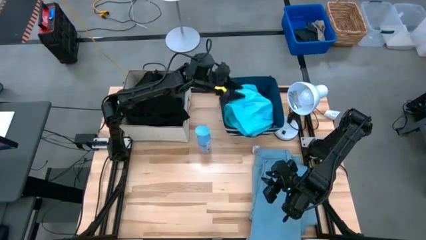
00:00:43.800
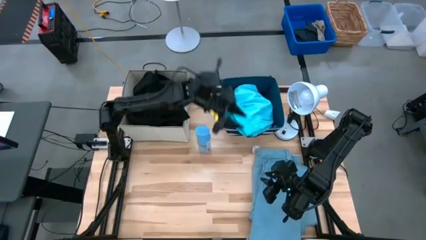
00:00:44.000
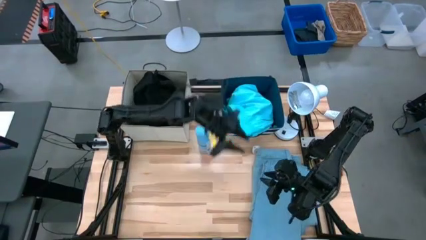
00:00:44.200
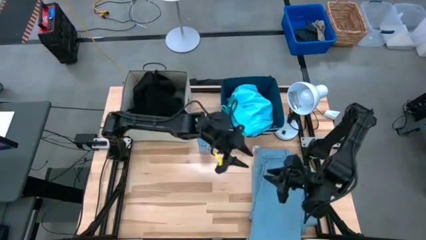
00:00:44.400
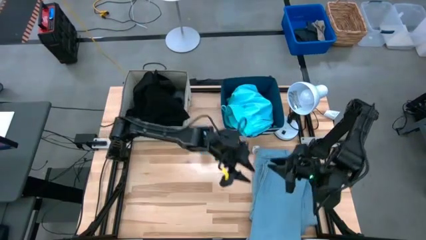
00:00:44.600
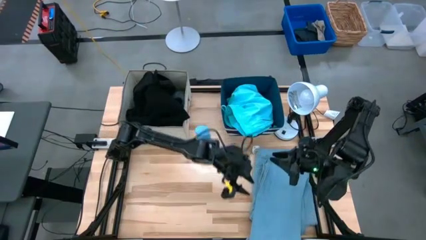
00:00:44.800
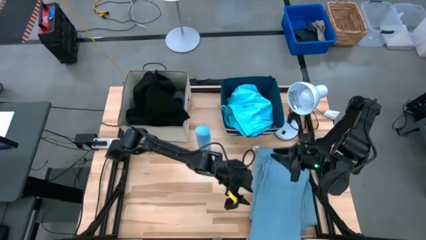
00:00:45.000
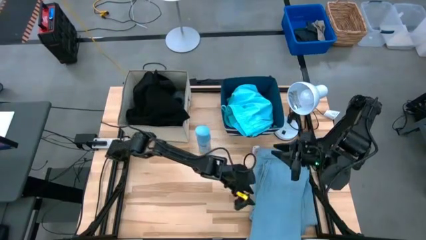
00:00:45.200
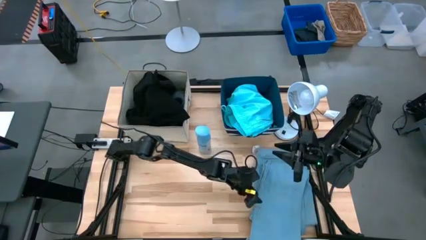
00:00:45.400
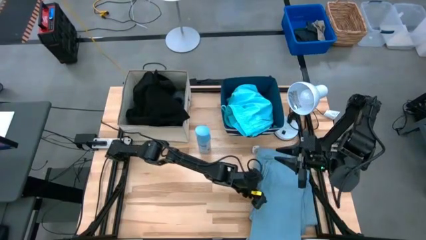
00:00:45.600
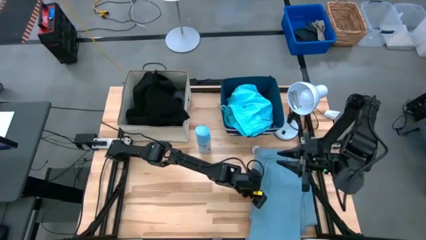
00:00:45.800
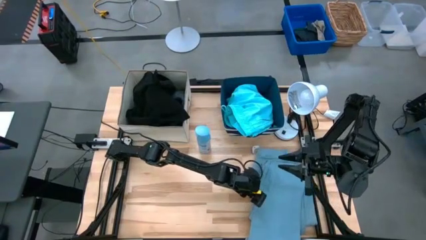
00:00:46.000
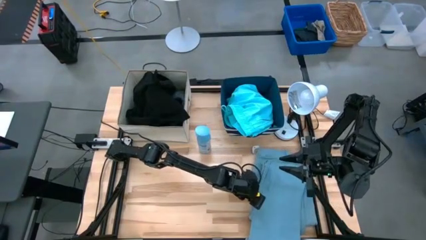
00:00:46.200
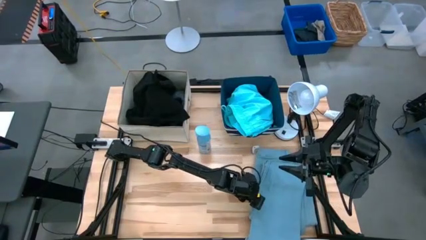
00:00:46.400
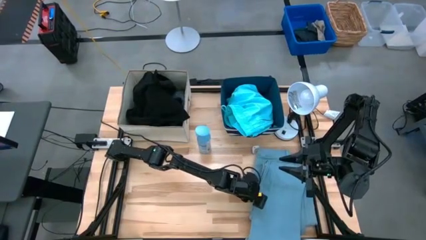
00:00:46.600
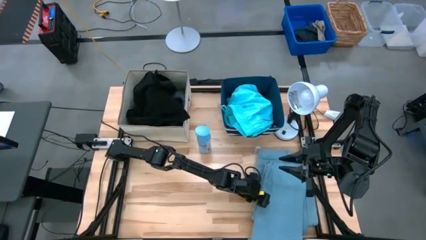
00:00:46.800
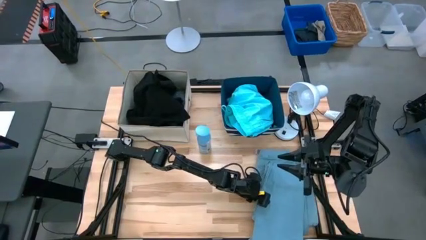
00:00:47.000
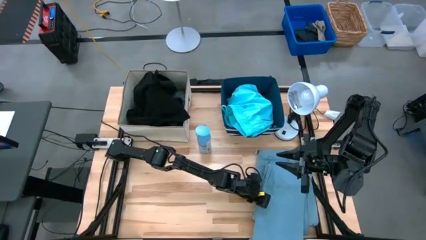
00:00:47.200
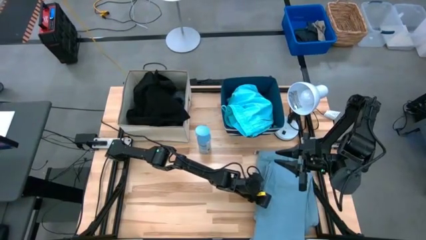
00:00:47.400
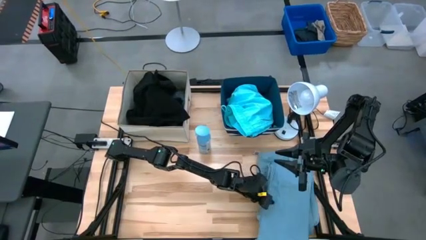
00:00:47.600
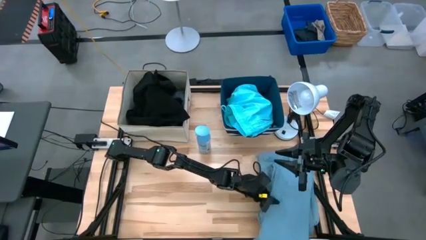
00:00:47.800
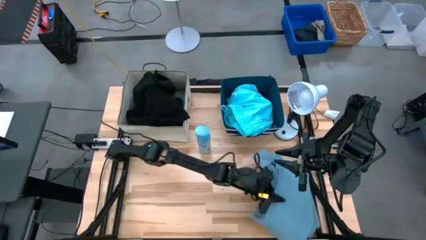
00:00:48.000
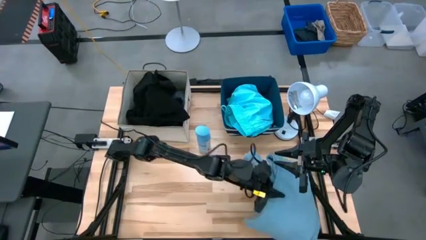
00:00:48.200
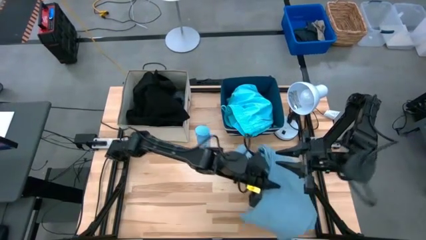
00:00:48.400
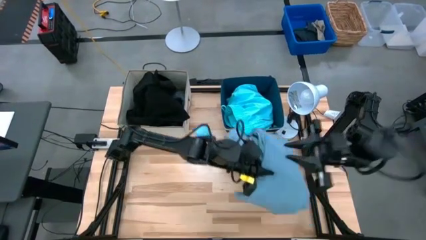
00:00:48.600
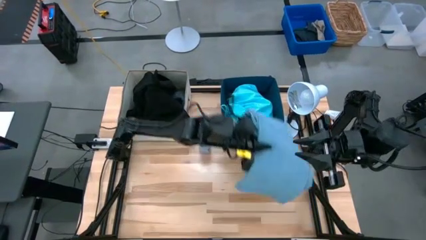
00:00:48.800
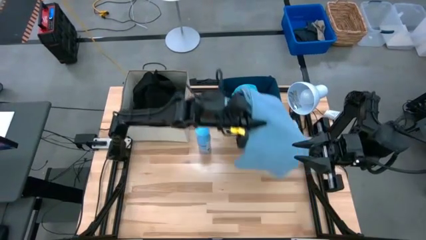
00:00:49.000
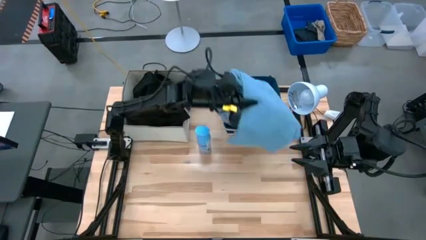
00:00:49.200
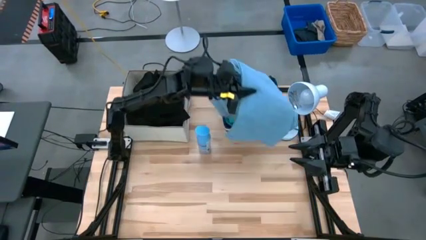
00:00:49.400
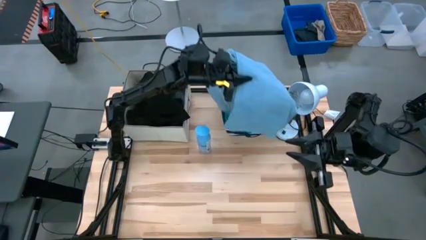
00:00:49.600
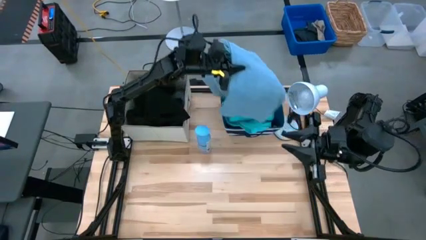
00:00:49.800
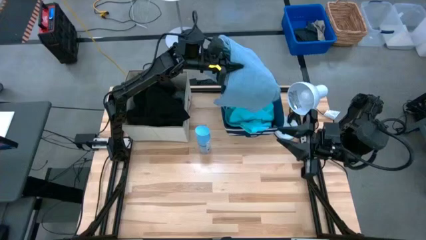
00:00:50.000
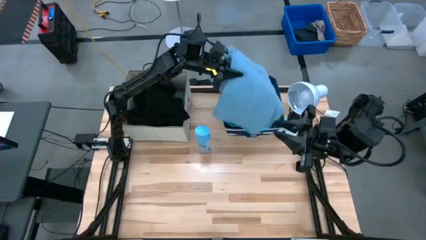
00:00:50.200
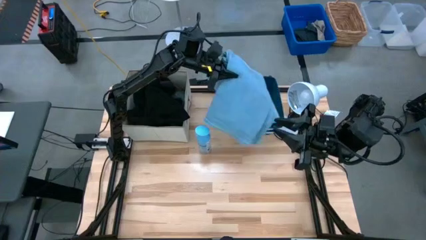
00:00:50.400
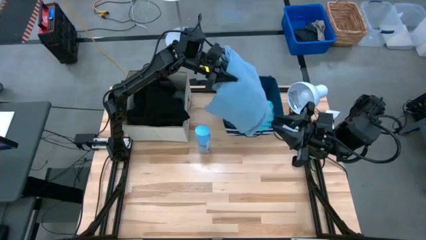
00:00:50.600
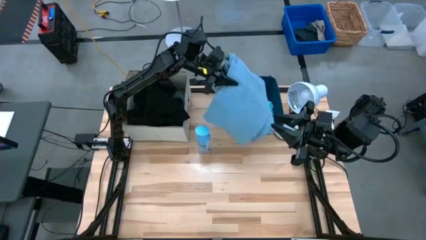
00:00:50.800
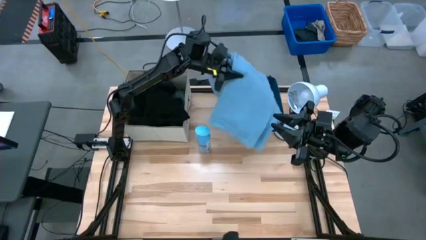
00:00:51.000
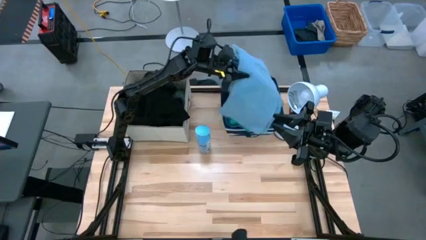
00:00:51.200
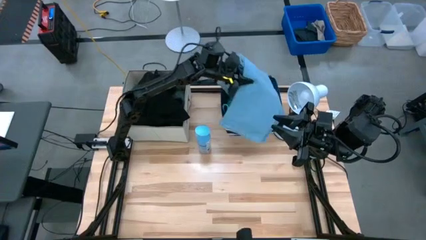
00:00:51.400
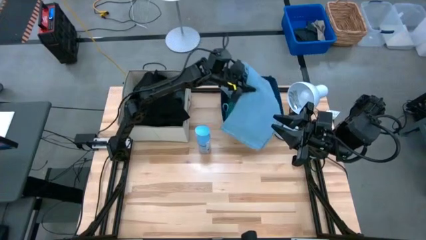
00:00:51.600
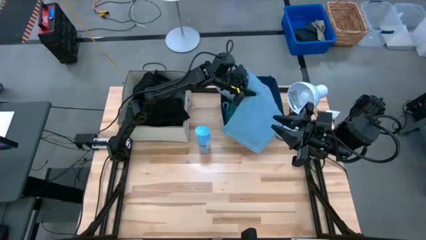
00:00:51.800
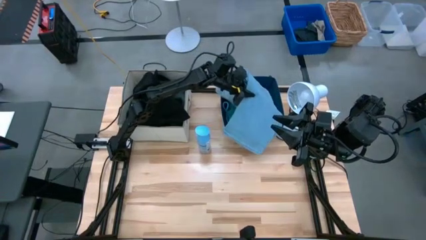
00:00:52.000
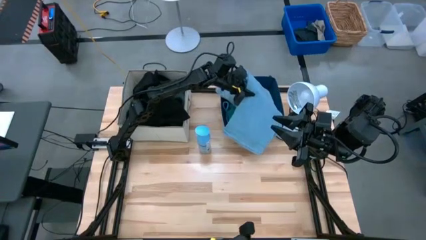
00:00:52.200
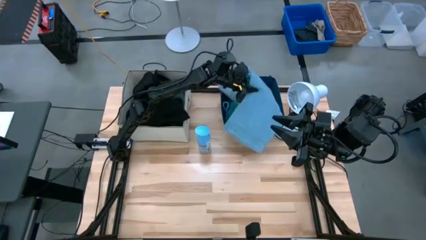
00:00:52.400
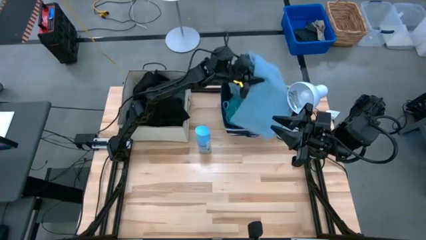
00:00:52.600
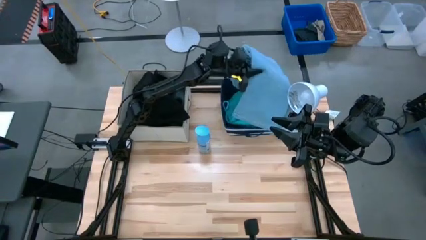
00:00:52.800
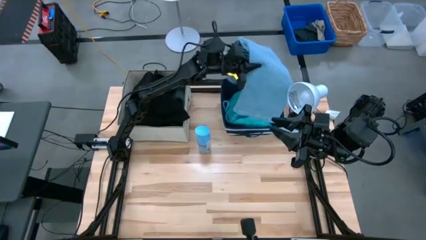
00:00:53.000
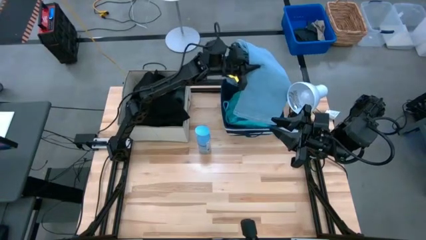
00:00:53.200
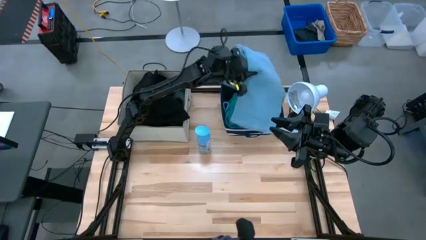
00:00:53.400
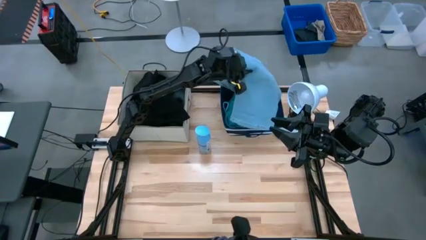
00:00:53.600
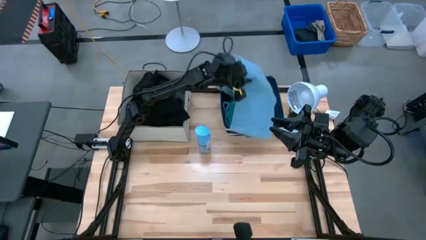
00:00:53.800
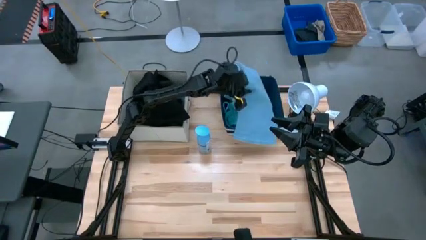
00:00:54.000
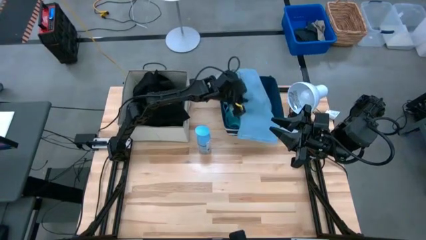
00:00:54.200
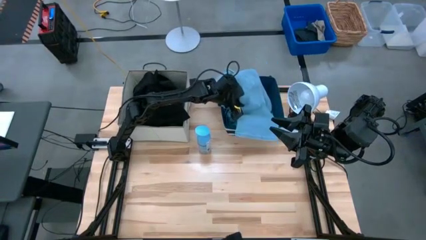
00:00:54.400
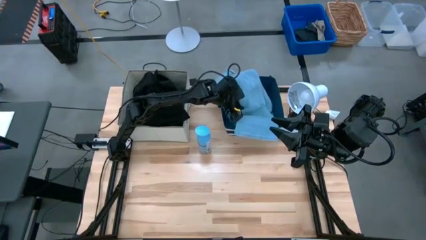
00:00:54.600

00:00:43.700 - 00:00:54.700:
Task: Sort clothes
Put the blue pants into the blue laundry bin
